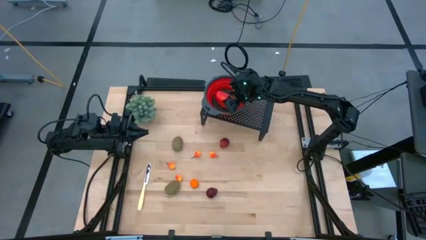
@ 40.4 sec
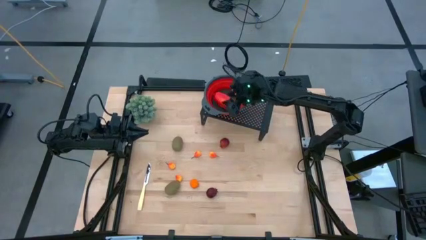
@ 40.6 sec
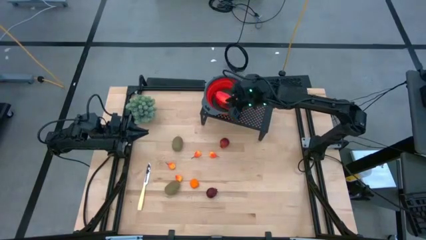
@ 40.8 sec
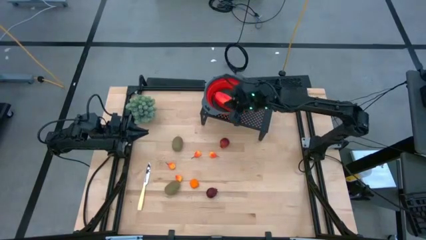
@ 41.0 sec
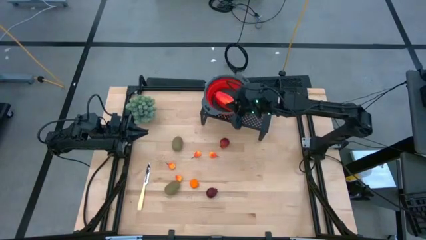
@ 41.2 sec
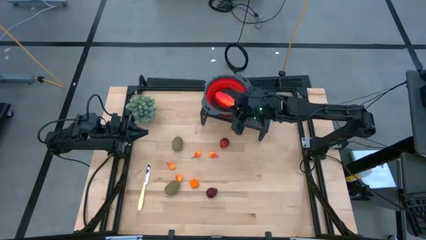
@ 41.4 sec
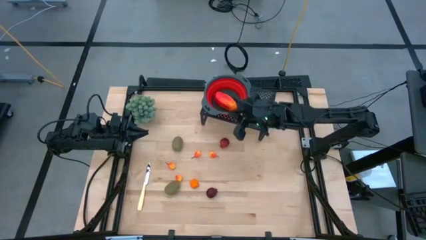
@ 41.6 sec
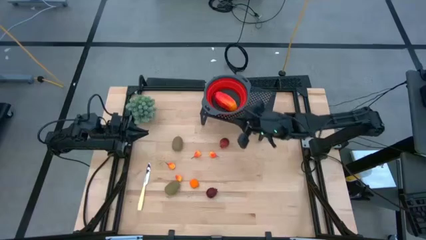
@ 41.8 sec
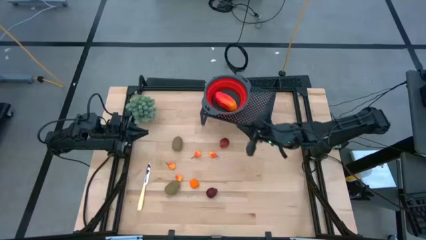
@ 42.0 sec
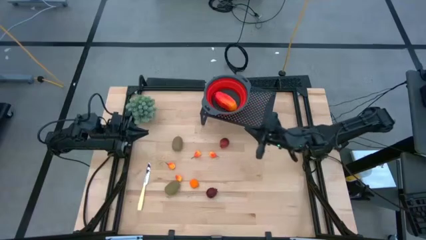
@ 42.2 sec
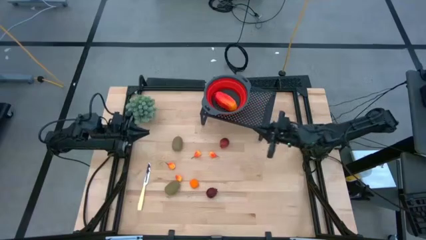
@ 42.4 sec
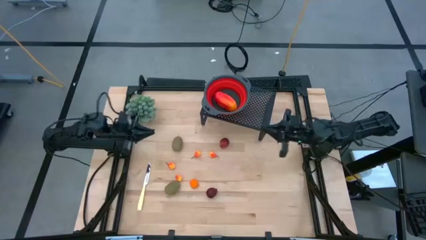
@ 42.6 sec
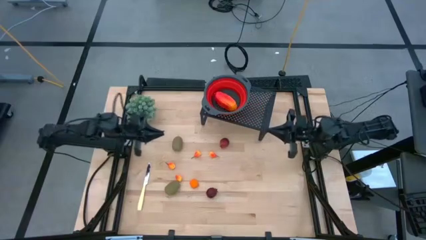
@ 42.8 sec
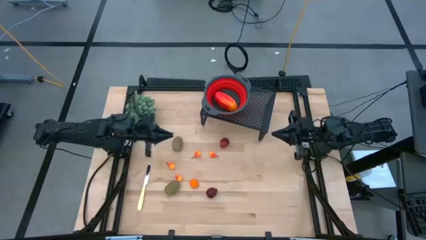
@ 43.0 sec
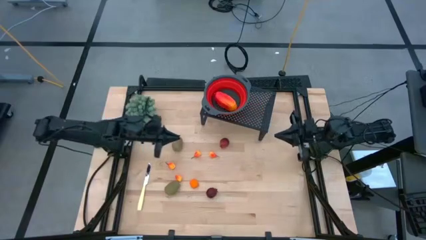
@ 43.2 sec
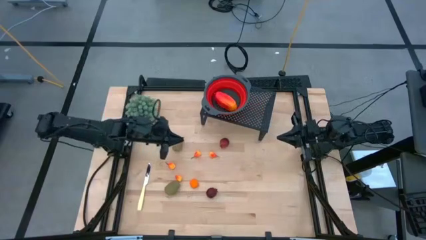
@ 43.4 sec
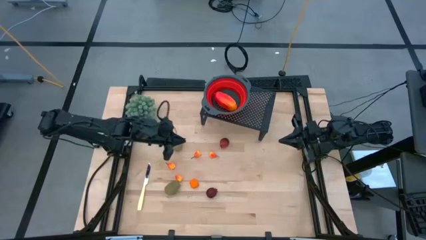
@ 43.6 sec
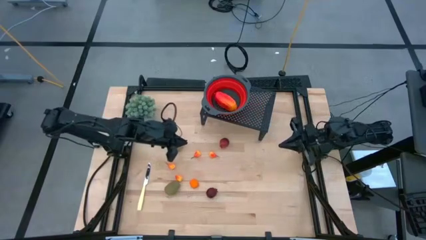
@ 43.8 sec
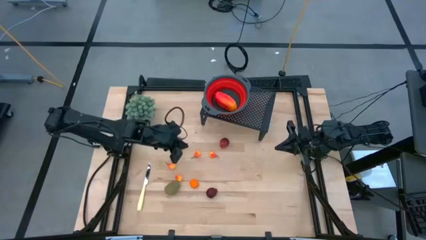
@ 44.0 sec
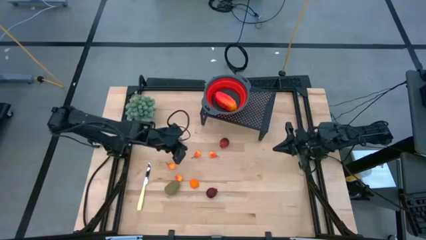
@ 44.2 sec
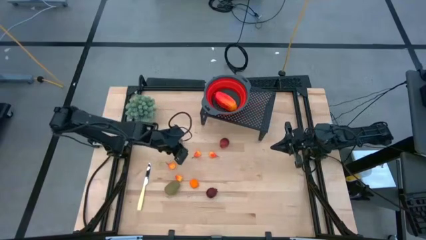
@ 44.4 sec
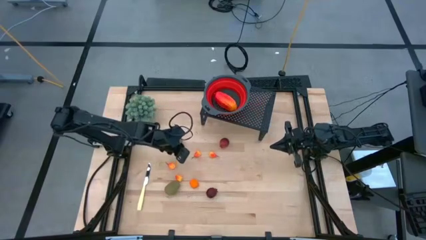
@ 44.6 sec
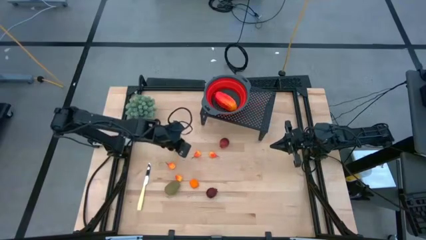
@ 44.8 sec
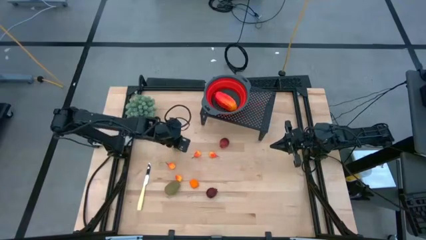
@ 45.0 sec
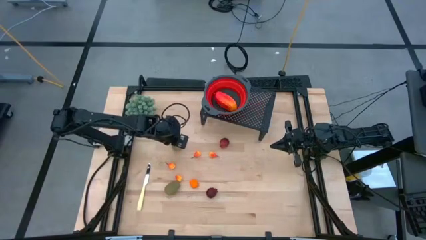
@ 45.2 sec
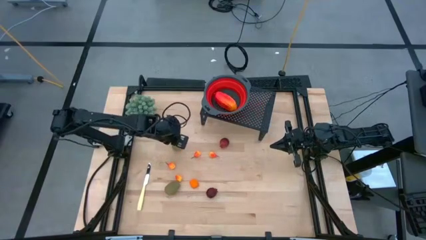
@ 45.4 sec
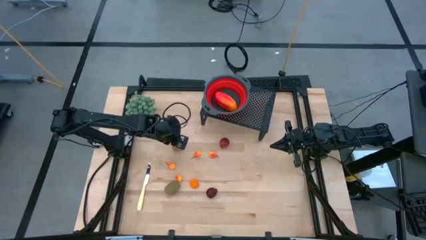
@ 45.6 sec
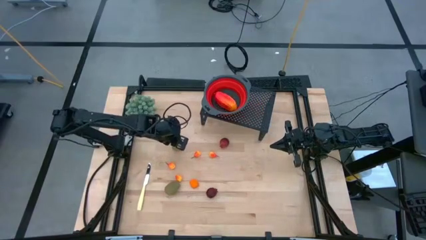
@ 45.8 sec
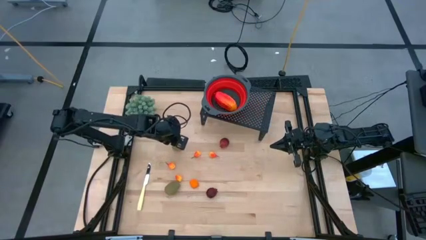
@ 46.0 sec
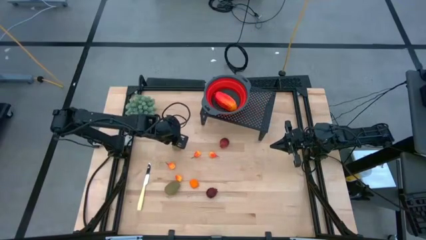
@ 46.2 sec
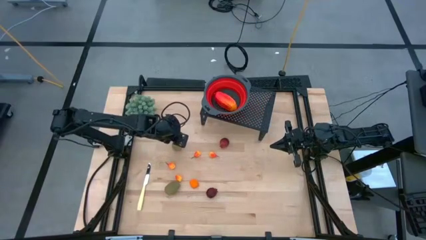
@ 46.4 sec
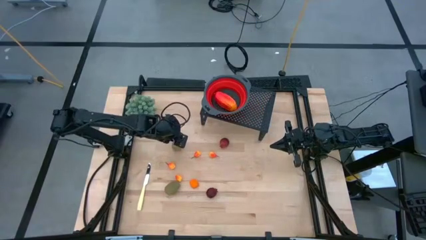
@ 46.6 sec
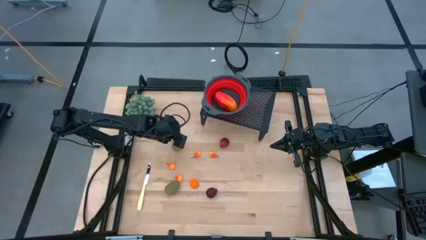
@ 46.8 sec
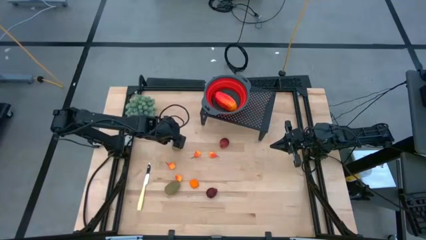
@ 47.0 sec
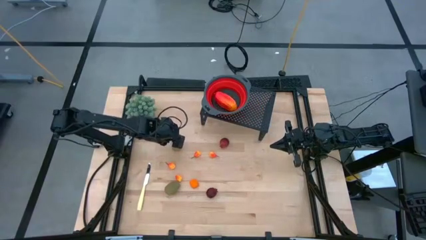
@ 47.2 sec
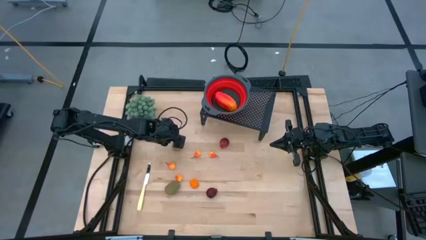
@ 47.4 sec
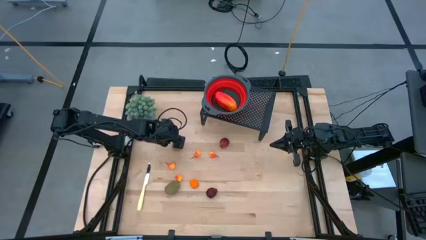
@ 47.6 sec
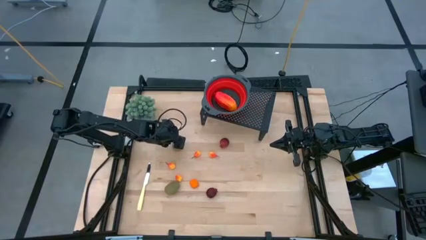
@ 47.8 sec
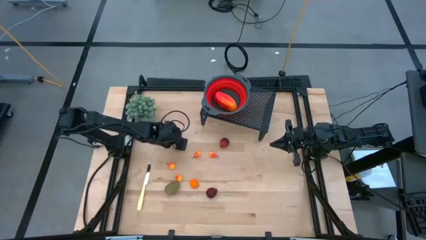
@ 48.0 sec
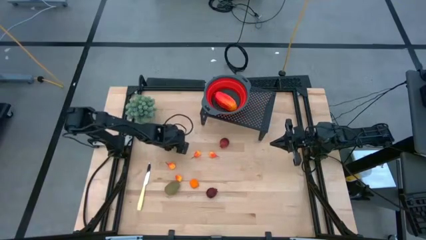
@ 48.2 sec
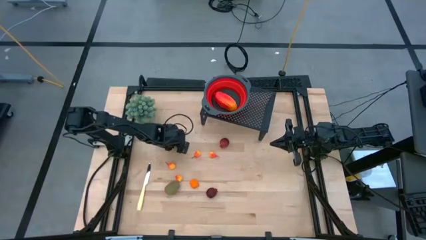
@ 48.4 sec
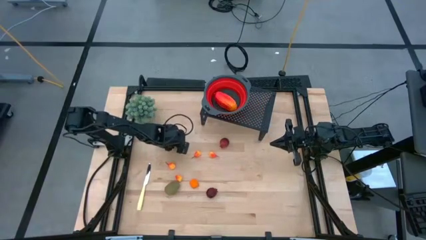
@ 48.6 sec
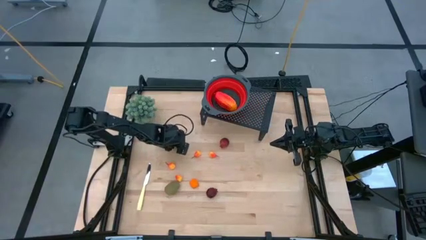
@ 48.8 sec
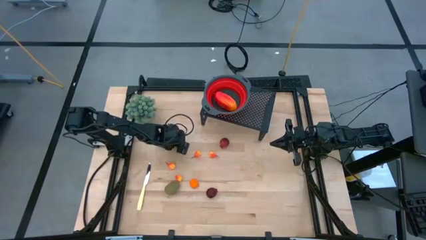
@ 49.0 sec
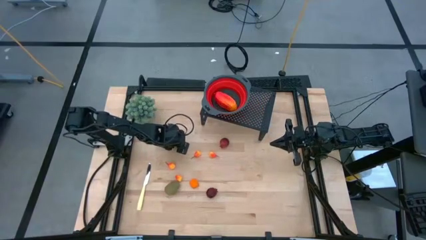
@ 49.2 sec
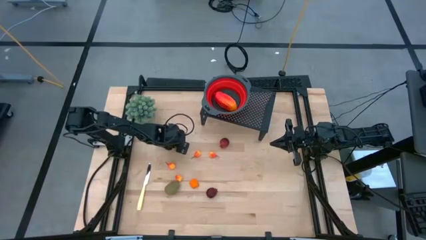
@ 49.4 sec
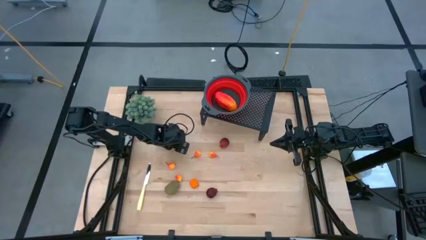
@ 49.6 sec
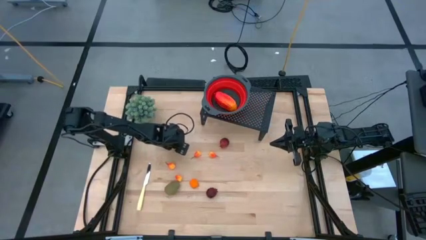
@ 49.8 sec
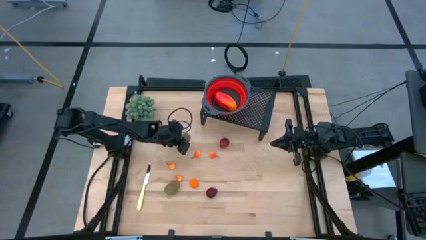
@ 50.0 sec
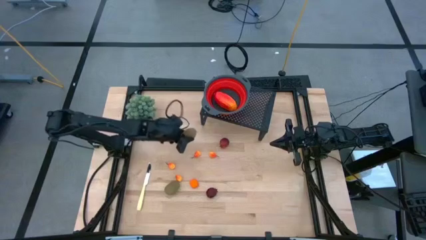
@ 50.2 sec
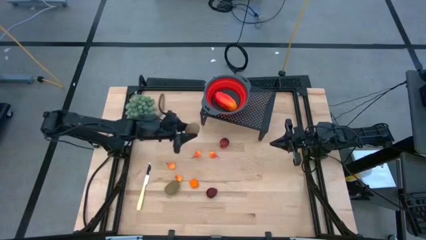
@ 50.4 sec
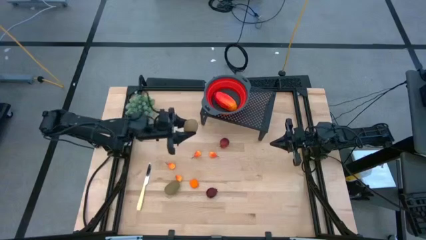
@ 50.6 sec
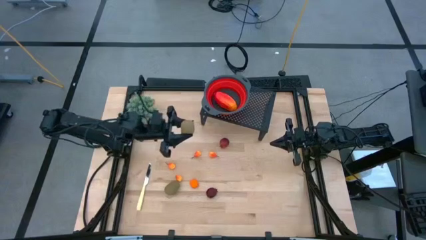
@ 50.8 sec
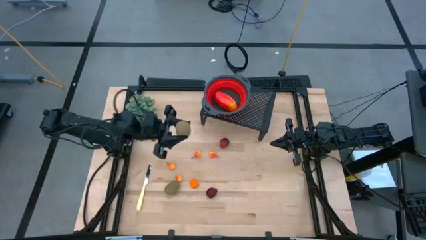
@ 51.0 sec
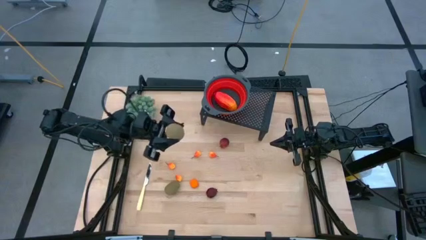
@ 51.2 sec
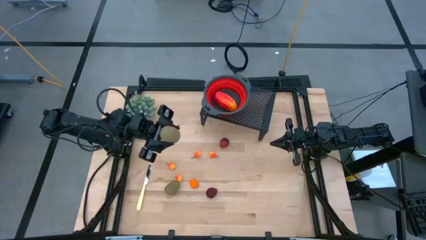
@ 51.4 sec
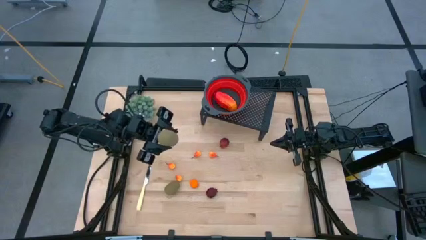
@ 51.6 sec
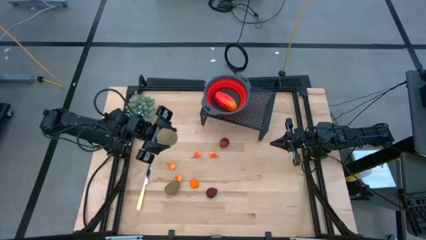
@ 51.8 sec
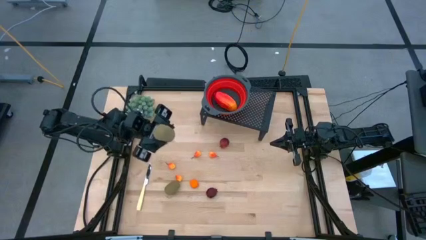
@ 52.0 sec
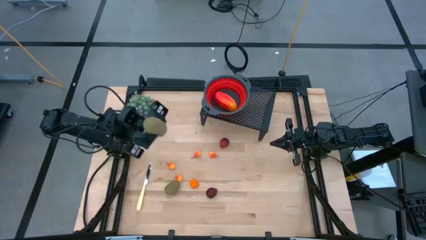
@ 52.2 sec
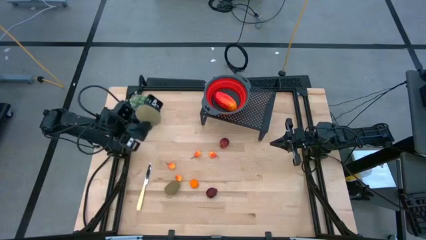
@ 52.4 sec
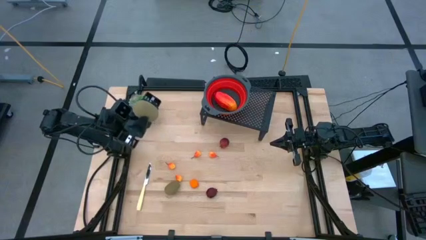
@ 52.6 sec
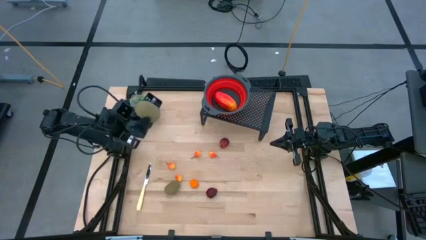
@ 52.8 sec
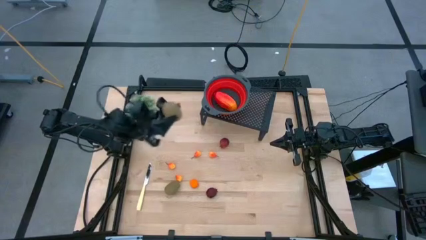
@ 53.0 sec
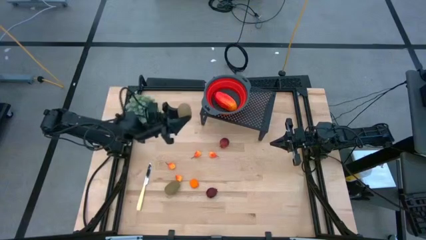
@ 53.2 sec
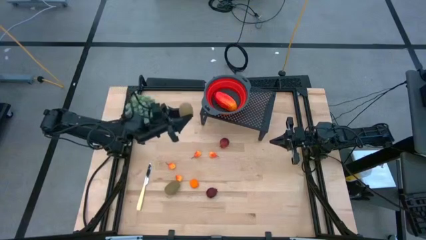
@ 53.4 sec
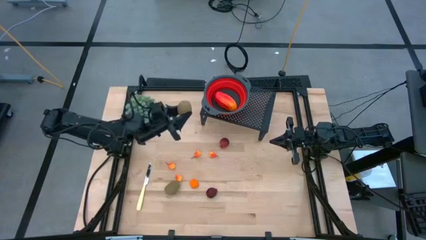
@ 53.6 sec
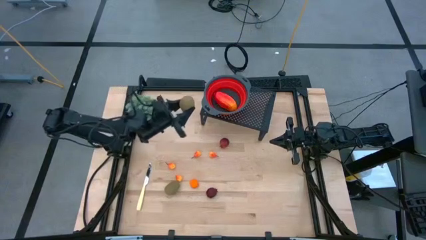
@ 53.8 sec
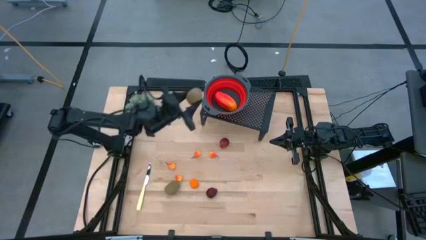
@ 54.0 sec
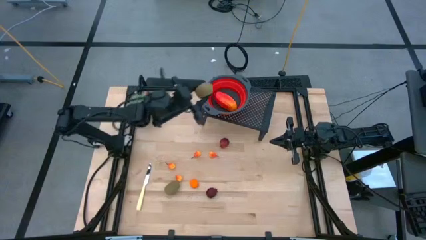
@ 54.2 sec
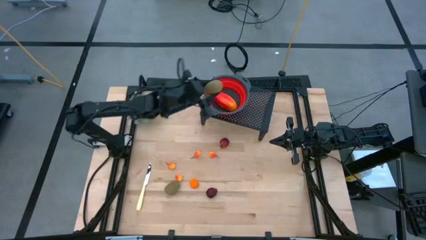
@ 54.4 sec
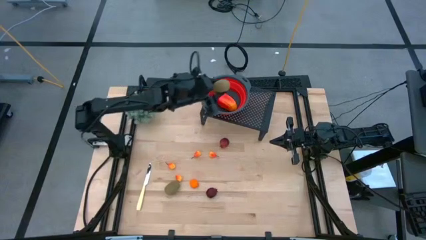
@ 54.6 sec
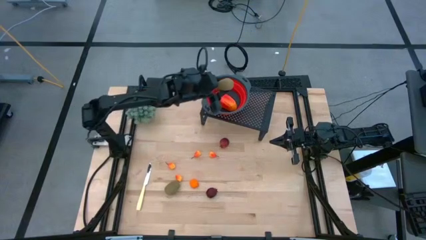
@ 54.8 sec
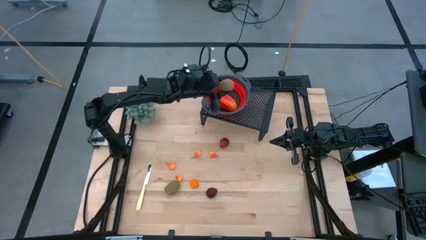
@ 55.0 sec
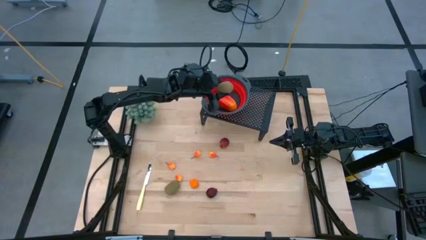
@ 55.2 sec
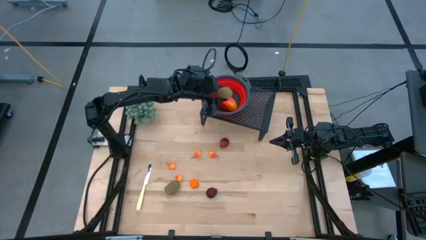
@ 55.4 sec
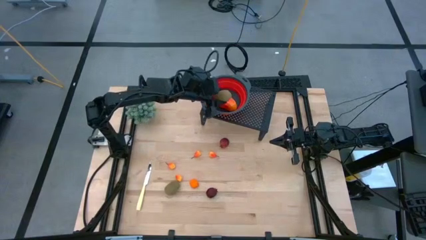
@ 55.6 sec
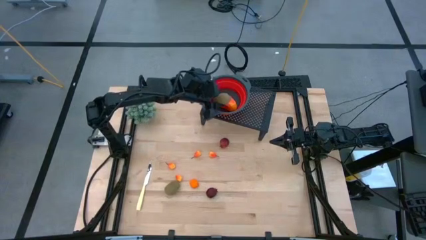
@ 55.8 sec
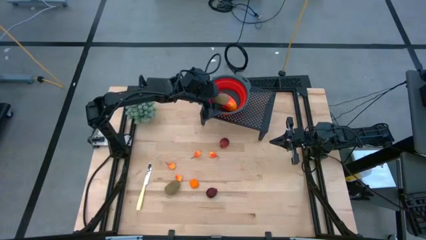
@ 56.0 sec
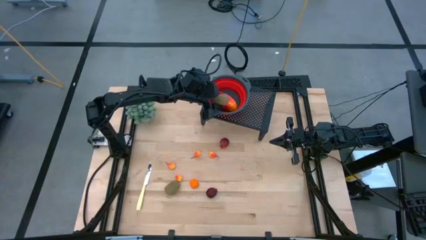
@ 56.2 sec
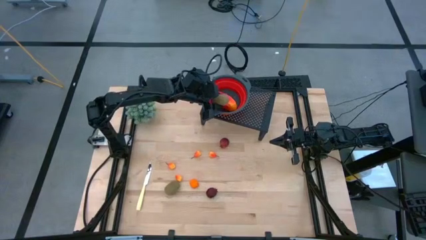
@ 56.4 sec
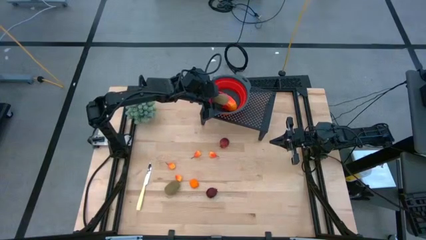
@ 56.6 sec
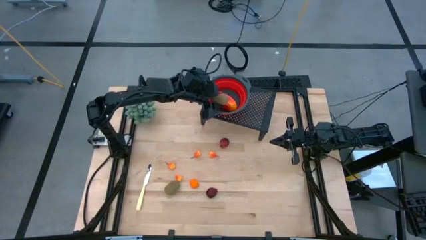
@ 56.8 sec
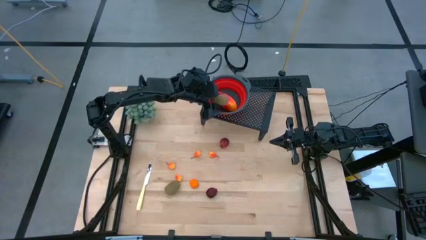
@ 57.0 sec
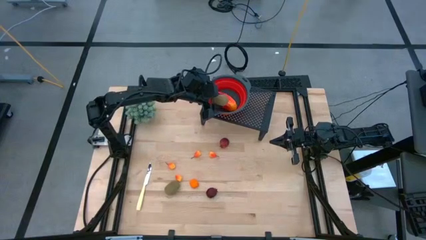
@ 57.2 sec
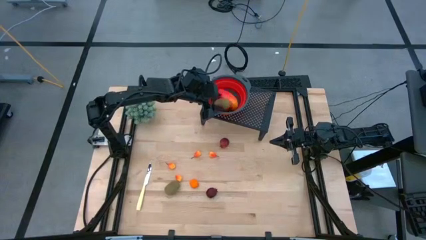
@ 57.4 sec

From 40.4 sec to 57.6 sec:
Task: Pick & Place Fruit
Put the top kiwi into the red strainer bowl on the shelf
